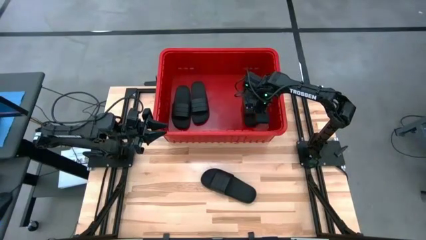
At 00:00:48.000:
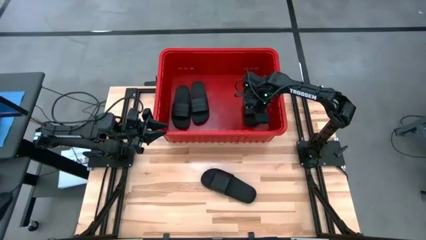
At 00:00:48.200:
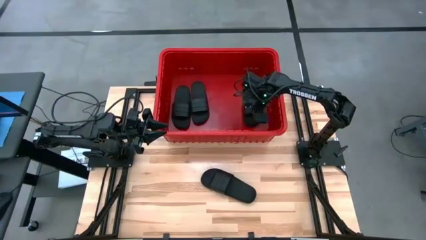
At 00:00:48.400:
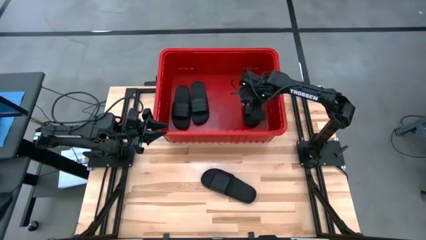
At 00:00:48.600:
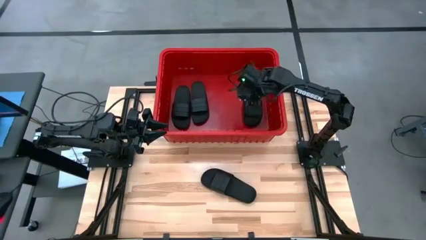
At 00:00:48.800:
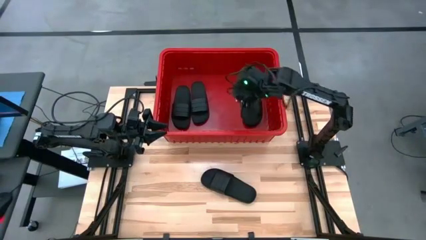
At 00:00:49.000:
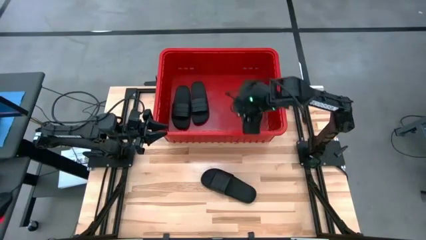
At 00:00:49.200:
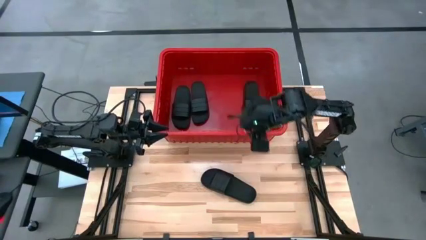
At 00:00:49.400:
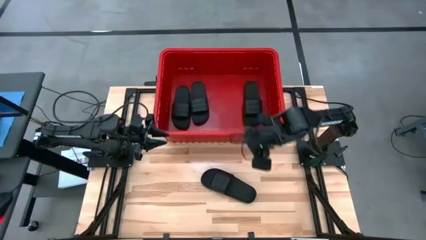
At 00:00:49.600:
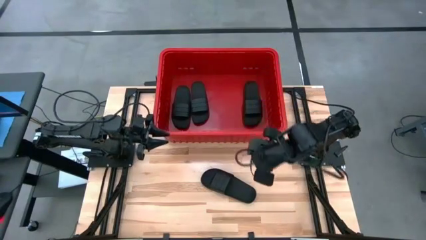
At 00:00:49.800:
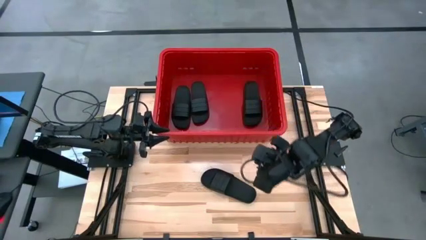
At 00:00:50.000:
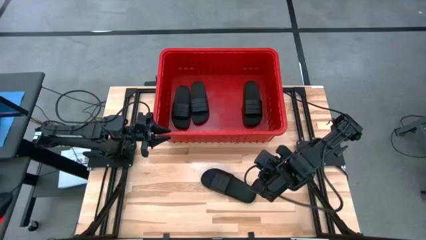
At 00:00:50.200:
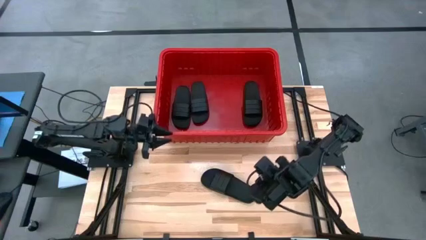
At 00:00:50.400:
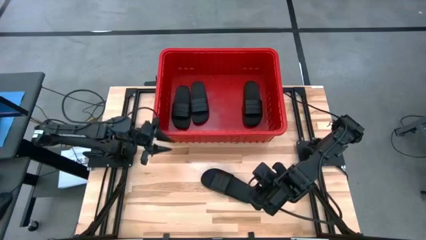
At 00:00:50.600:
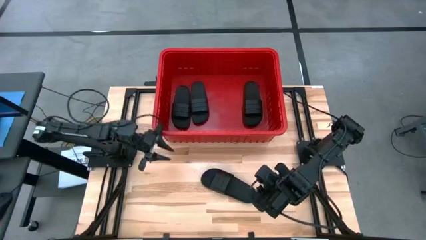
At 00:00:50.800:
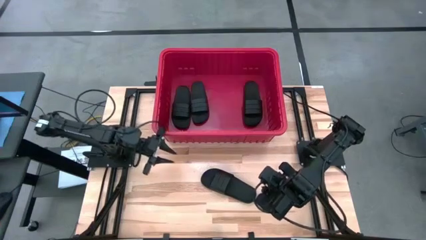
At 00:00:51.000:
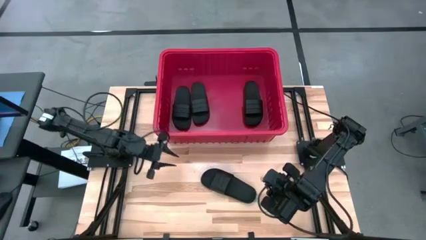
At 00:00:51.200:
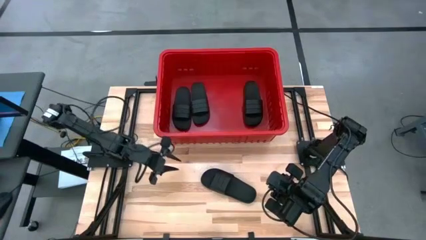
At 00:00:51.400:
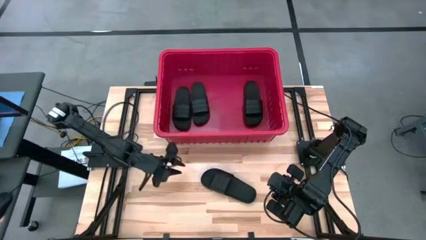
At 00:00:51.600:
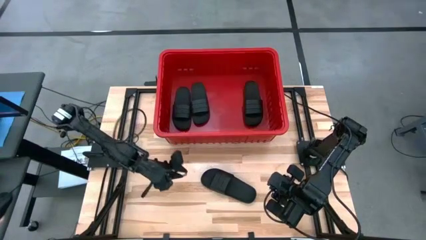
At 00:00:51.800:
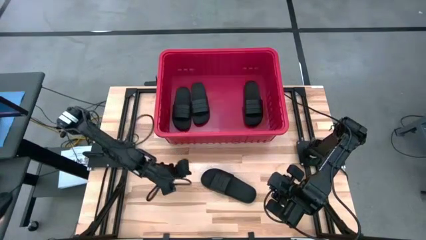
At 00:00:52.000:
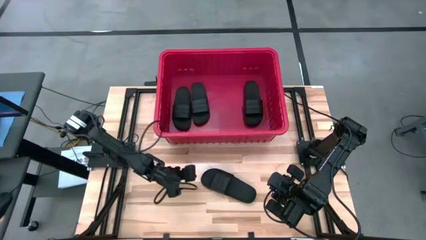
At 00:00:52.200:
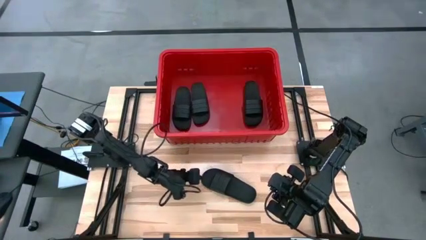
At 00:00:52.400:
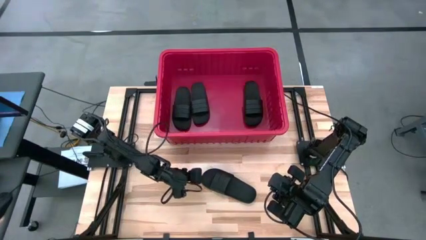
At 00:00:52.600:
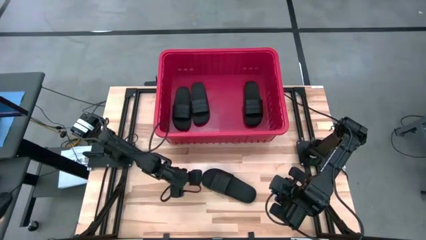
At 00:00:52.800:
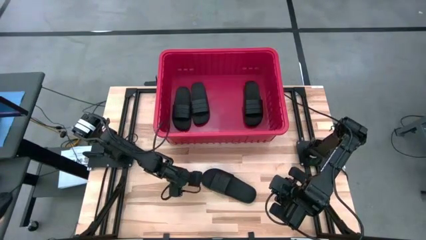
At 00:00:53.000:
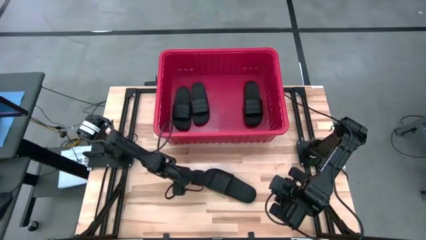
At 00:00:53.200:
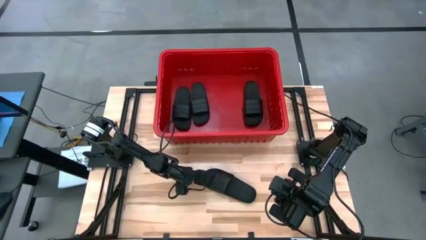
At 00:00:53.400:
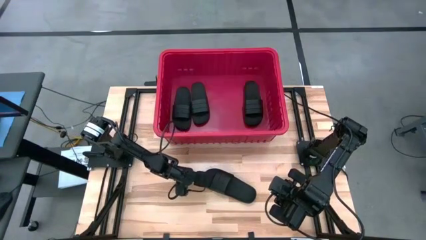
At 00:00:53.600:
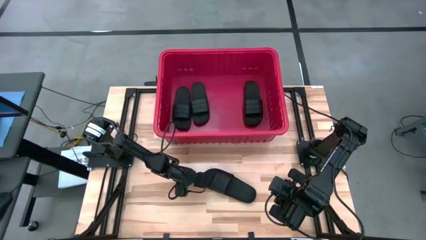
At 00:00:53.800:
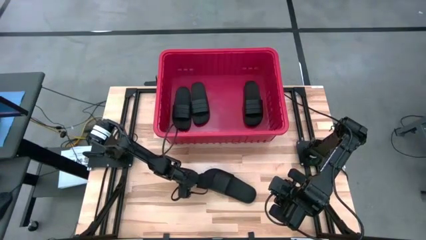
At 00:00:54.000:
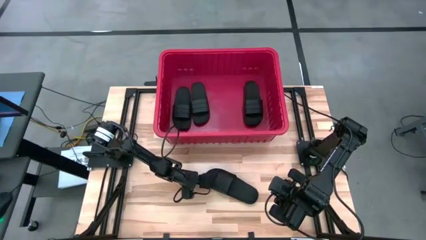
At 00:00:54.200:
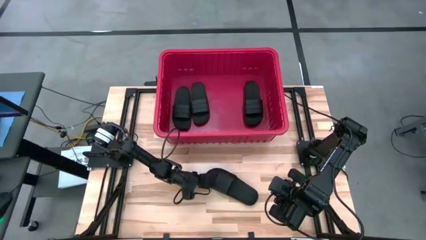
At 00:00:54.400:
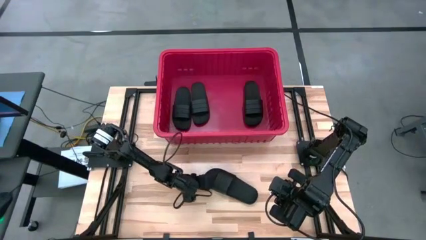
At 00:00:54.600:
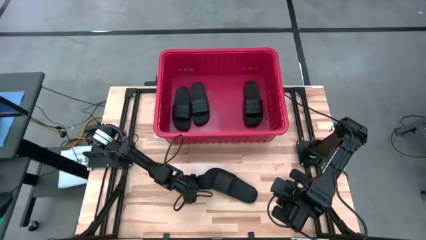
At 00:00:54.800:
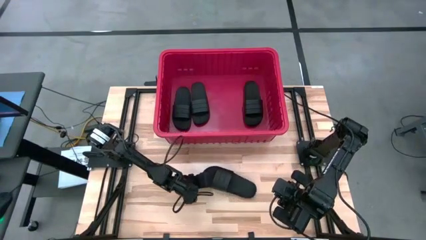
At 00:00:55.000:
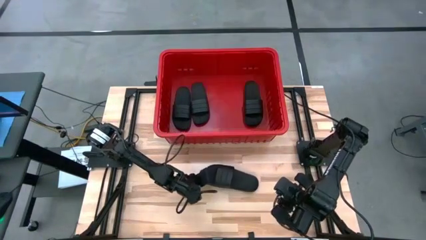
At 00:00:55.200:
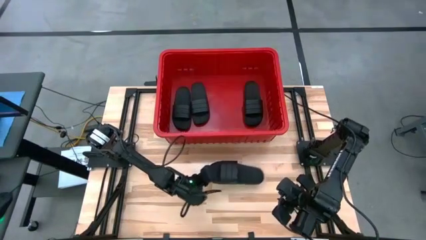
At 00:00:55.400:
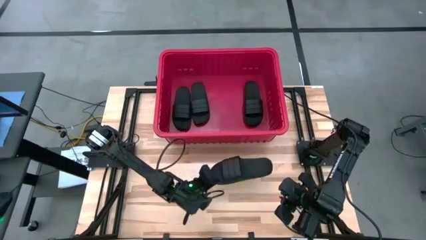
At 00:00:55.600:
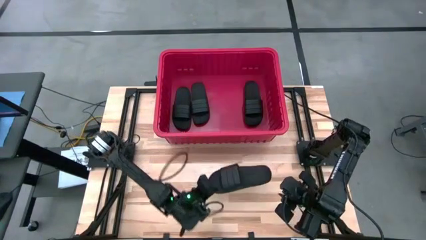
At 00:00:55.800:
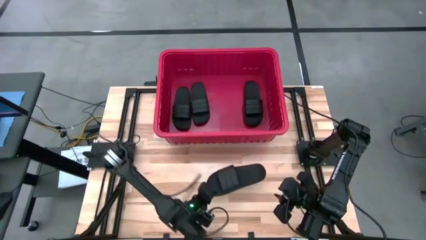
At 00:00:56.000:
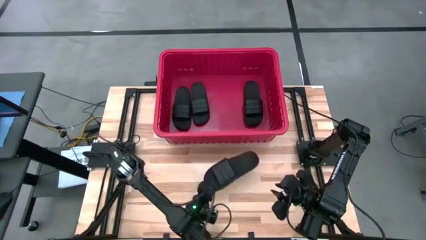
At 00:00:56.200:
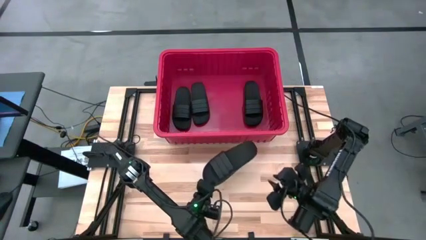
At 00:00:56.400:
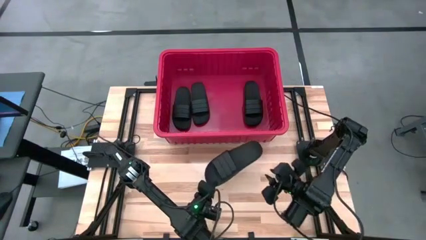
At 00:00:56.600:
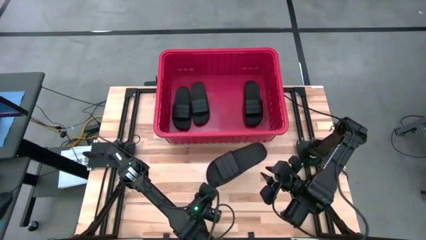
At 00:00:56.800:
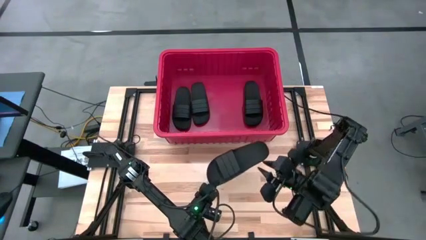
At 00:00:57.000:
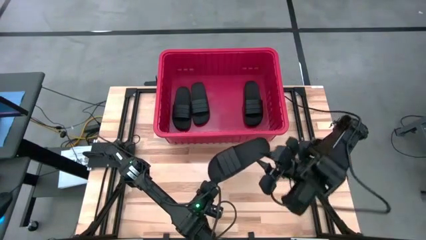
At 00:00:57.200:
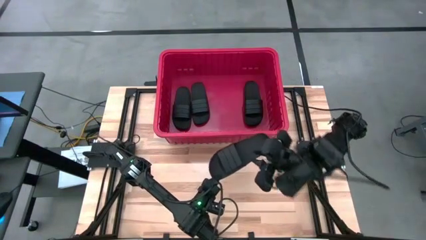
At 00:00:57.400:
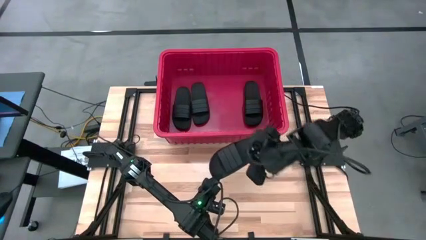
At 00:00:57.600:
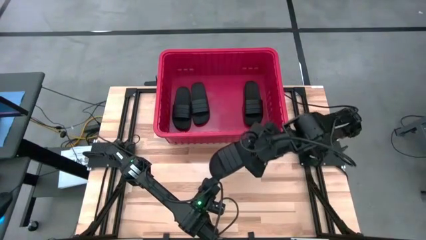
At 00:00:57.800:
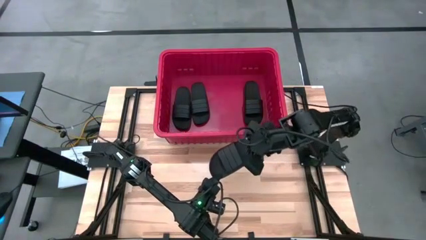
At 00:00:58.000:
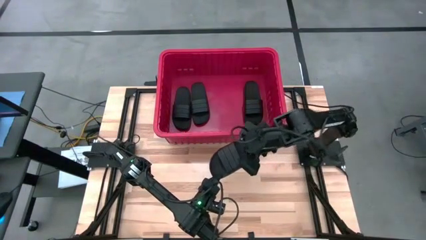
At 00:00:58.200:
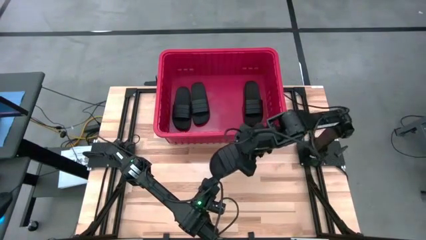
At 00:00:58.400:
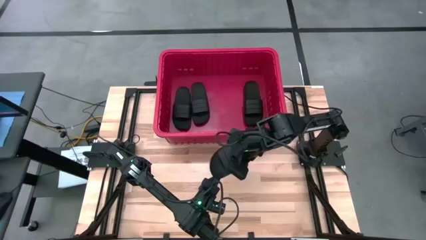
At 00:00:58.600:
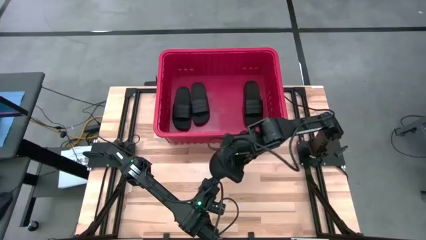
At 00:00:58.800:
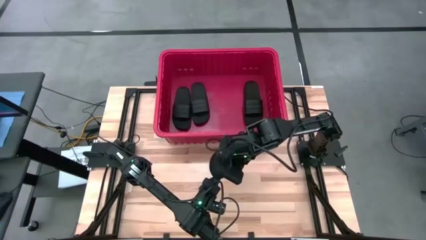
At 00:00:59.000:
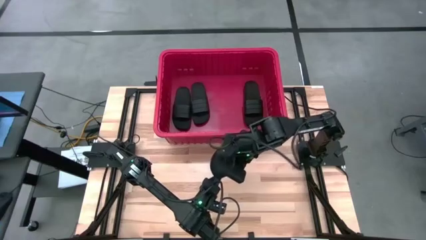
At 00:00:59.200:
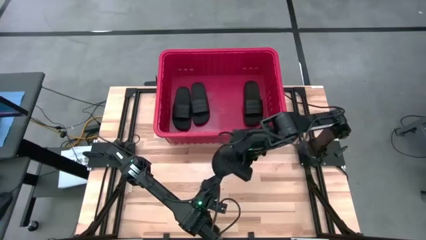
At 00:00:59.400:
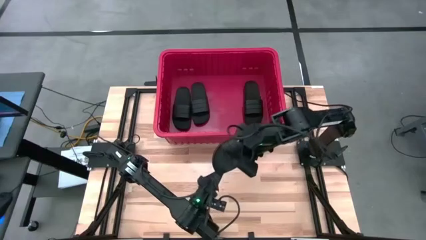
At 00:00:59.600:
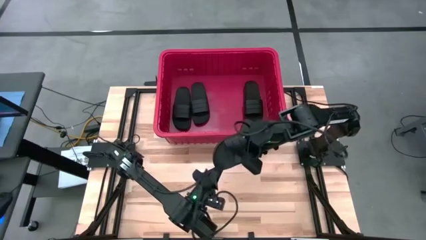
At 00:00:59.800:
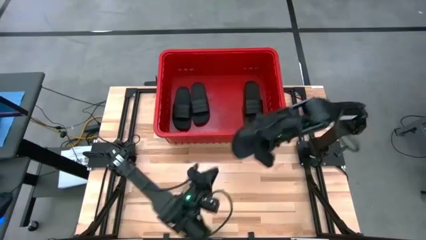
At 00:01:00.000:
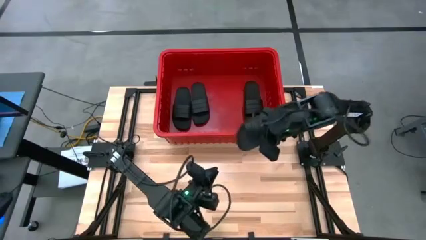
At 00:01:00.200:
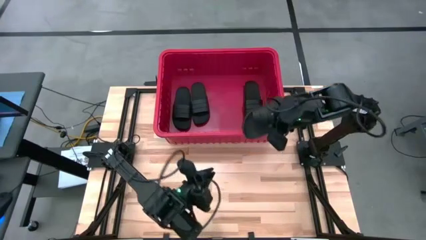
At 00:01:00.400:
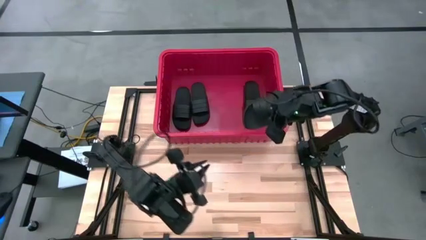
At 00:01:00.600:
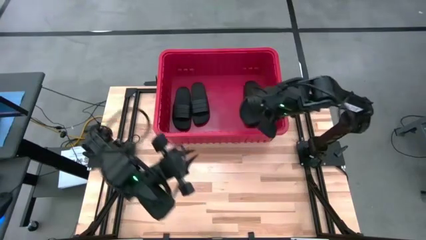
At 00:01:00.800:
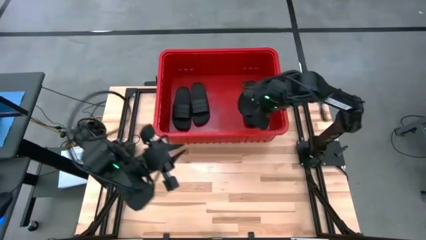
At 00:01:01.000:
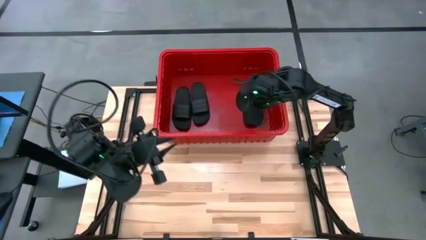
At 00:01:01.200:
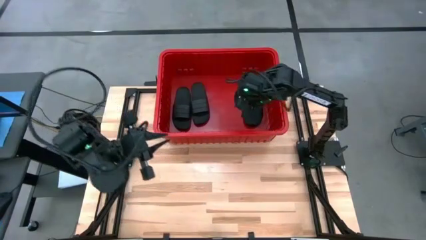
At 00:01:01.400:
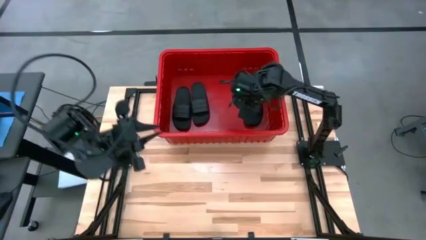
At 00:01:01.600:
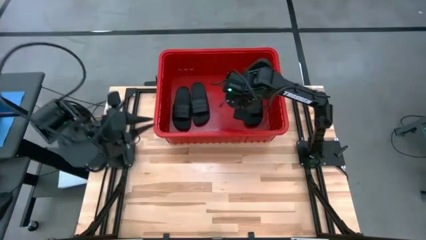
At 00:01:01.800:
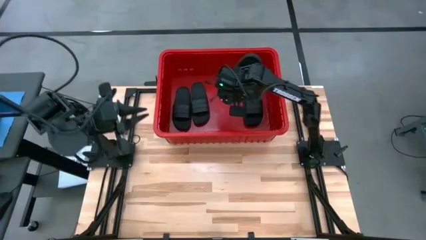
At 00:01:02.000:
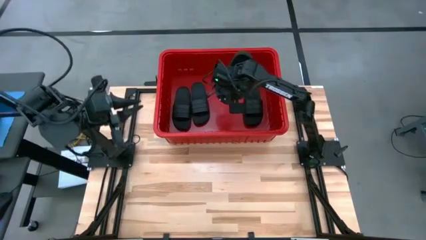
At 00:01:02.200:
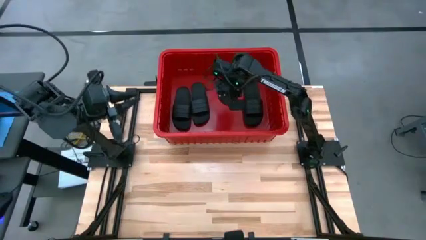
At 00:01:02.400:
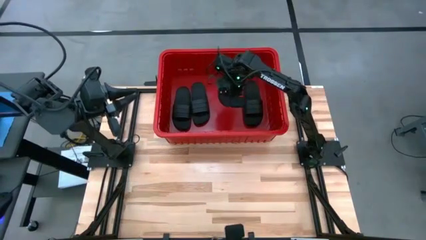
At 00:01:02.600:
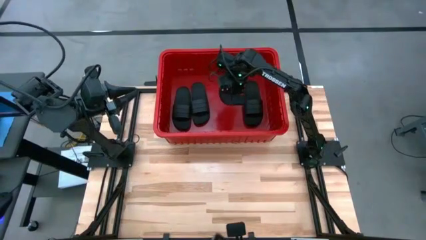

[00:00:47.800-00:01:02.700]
Task: Pick and place slides into bin
Put the black slide into the red bin

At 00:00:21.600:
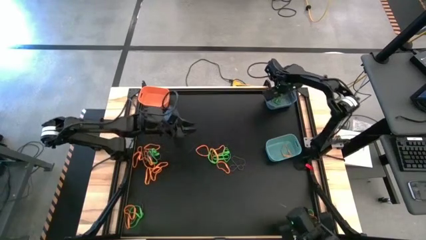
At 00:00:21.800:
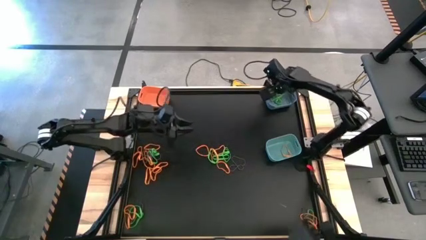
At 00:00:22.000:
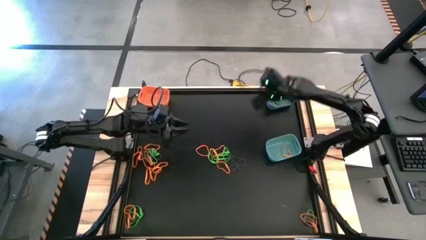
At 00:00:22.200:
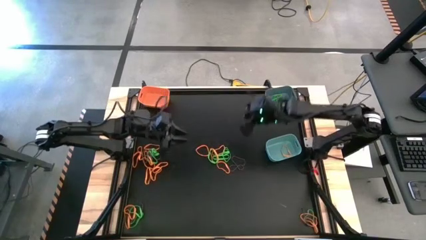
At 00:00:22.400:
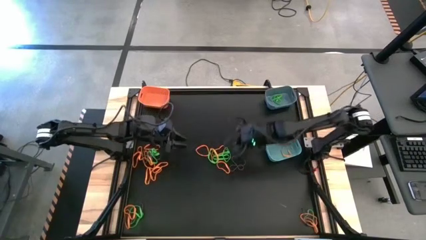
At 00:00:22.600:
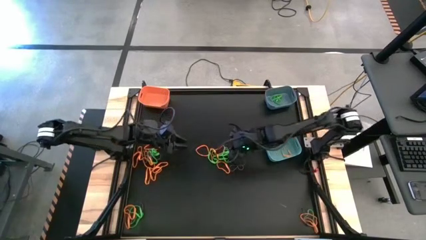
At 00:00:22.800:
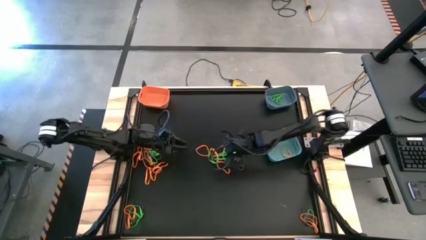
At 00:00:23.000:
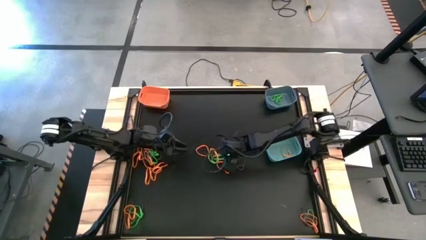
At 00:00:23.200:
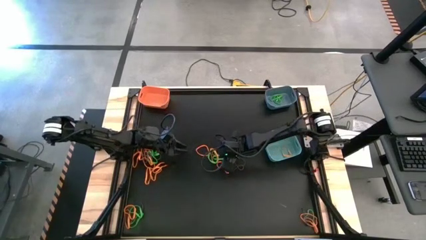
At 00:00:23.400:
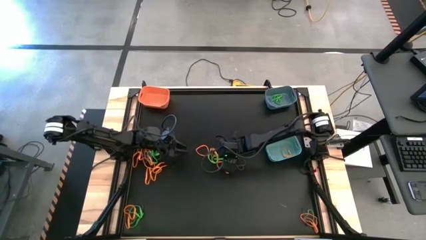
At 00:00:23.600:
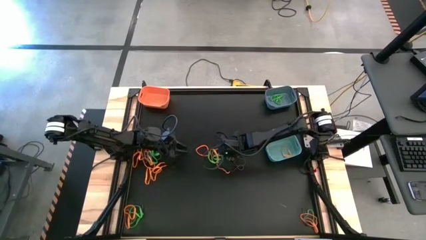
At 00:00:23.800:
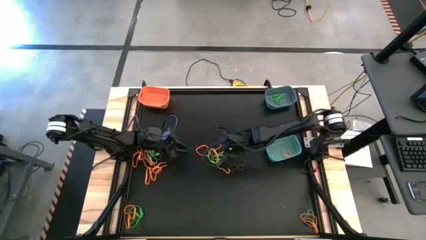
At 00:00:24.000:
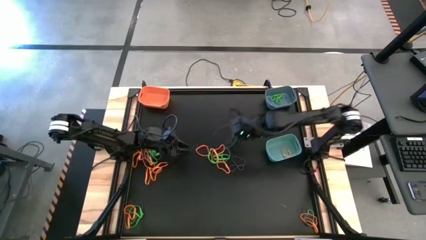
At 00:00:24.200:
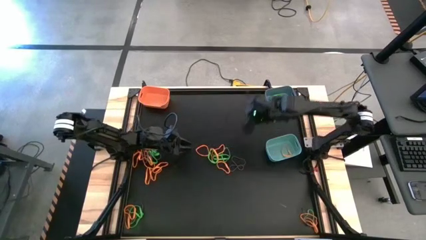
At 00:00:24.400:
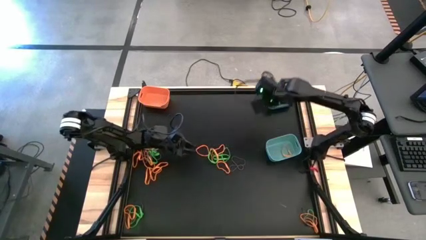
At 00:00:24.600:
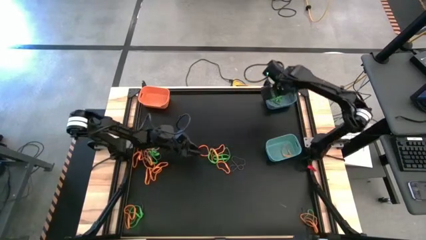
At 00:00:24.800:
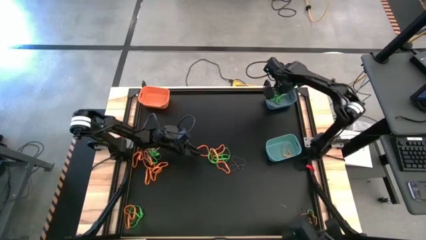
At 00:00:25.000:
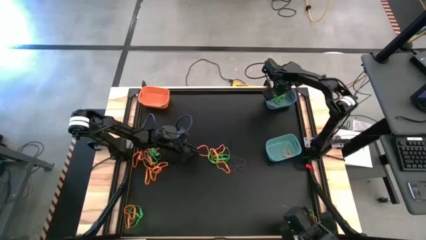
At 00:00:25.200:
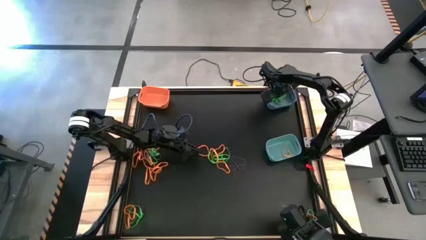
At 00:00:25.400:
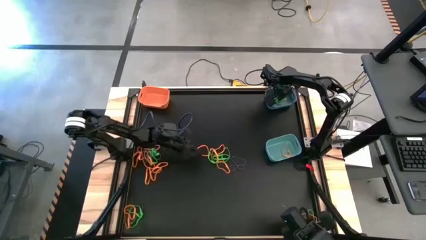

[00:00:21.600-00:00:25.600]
Task: Sort rubber bands into baskets
Put the green rubber band into the blue bin
